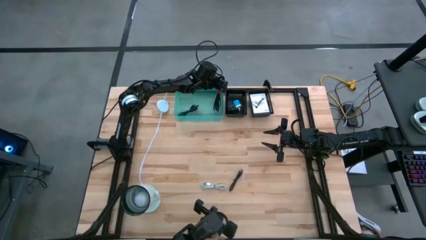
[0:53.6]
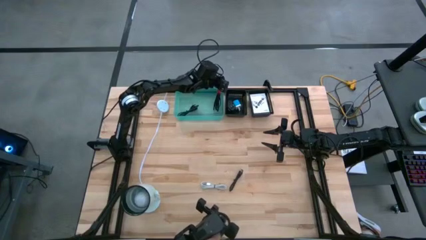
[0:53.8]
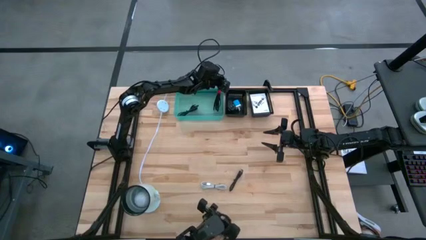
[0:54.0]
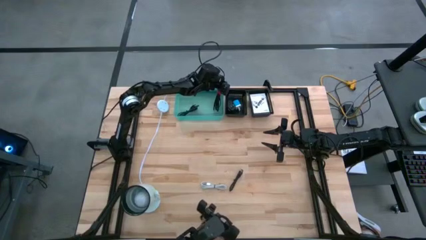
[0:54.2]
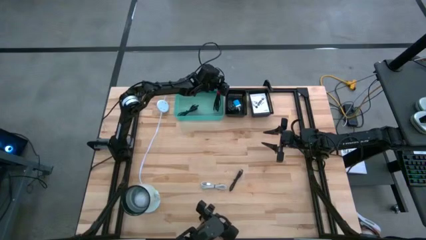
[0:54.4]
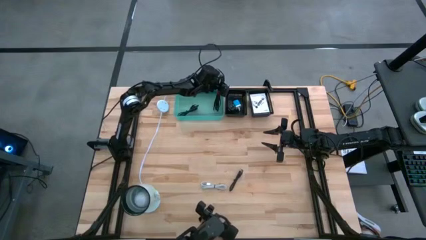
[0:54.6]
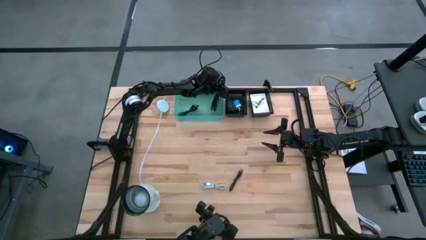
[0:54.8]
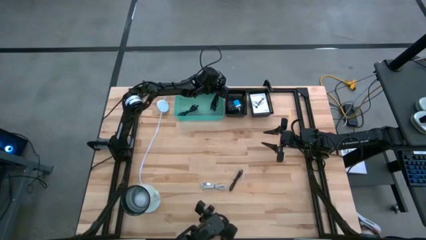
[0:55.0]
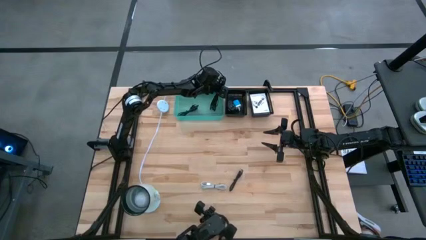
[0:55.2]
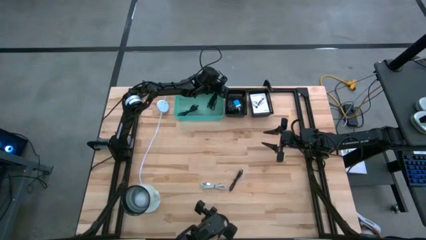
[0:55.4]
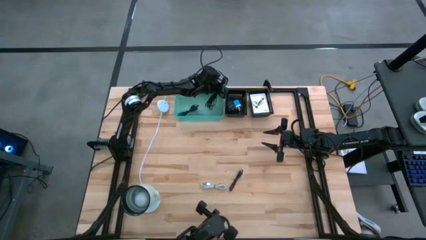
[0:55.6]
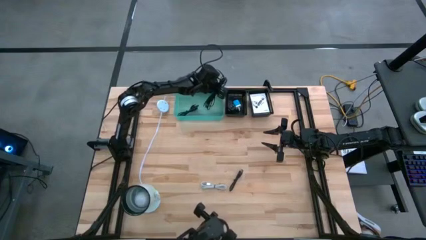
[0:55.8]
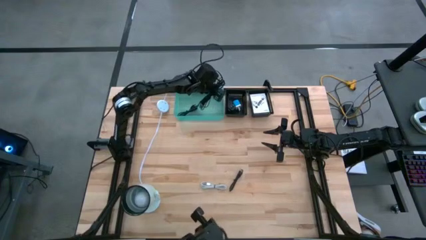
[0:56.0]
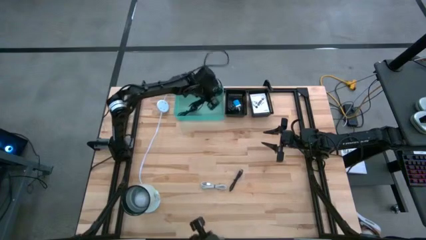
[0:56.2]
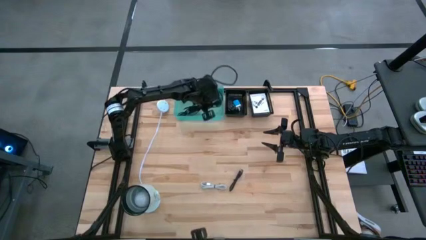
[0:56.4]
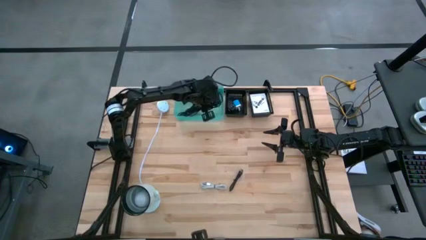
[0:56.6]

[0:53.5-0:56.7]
Task: Pick and place items into bin
Put the left black charger cable into the blue bin

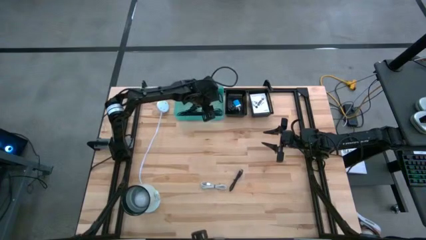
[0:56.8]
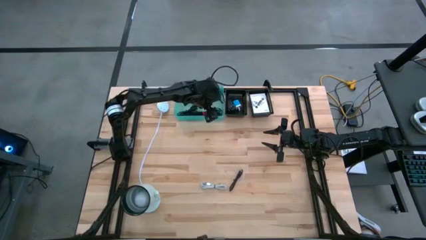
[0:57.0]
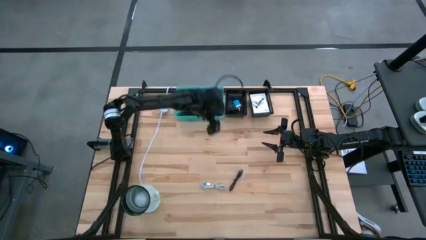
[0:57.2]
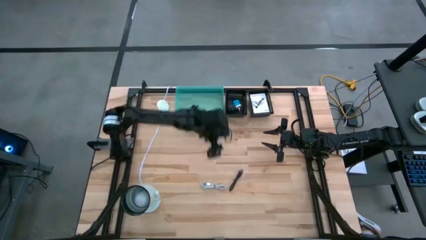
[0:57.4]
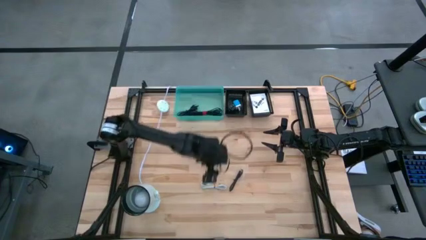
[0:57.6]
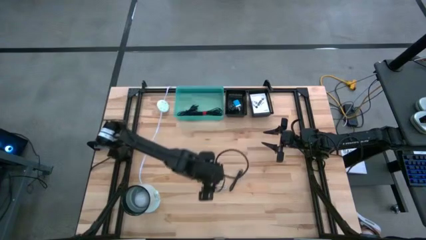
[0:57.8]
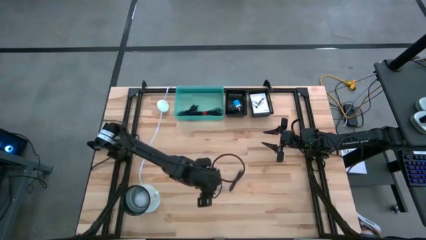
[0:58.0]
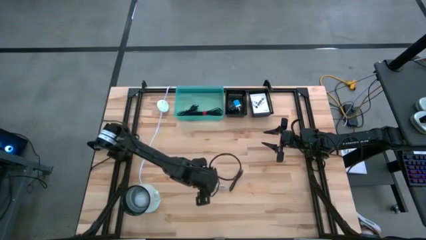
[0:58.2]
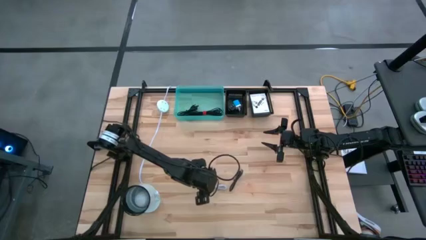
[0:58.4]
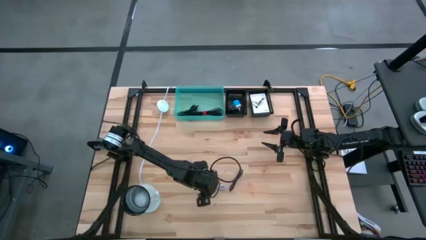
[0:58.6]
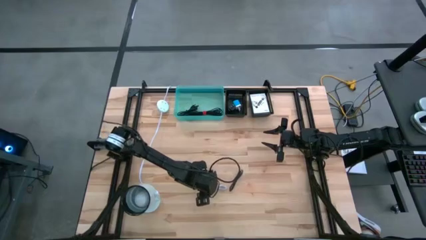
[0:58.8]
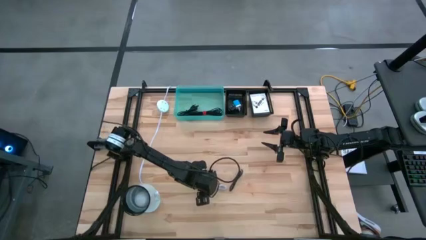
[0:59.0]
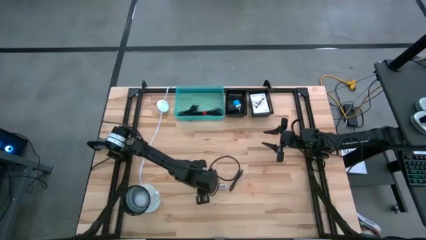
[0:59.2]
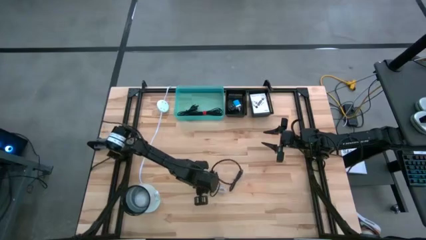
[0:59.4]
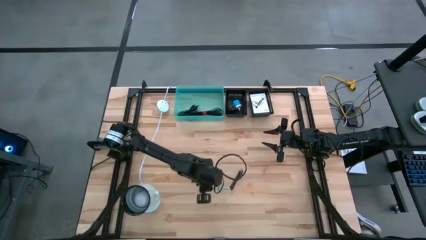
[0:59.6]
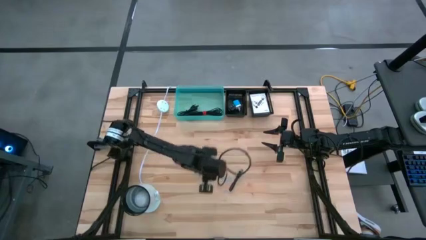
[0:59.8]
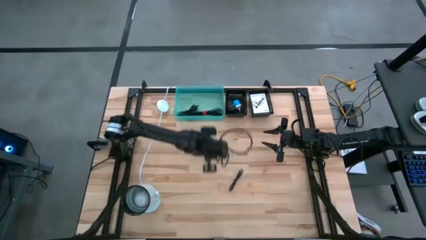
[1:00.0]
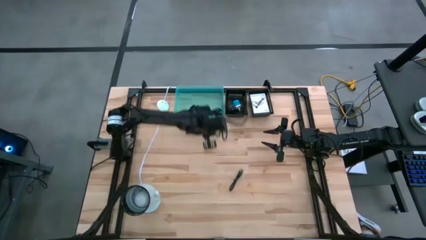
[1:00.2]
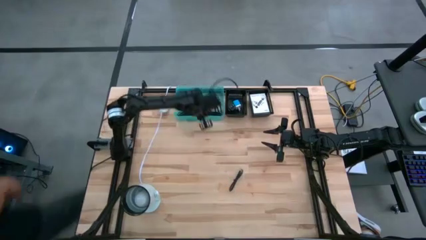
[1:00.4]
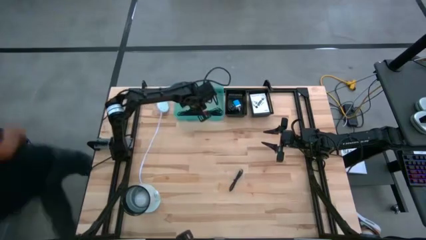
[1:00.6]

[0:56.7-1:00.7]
Put the white charger cable into the blue bin

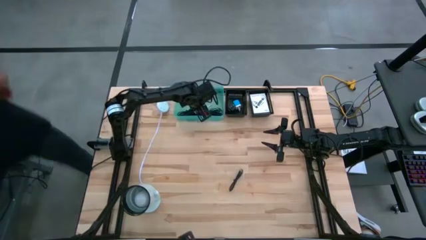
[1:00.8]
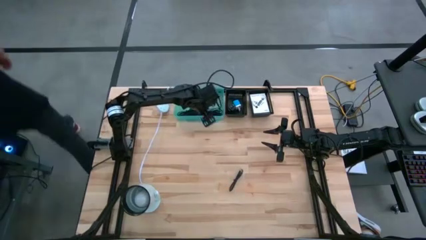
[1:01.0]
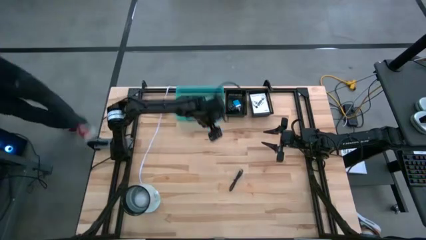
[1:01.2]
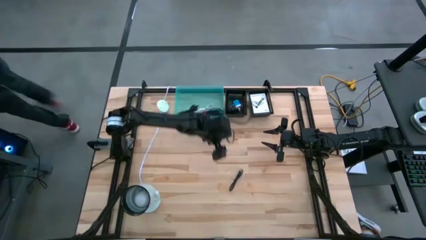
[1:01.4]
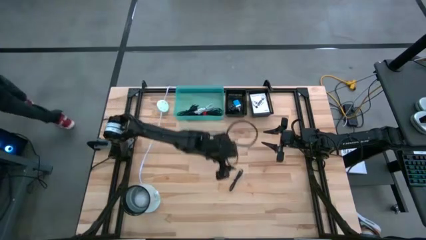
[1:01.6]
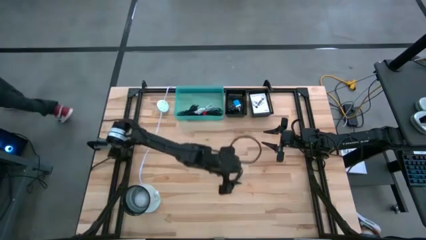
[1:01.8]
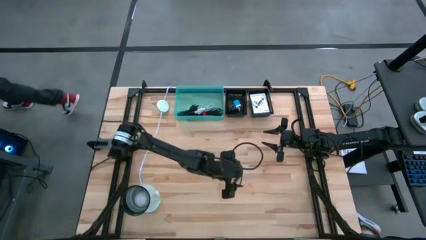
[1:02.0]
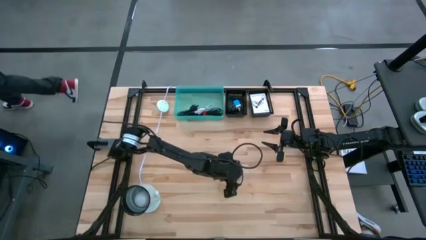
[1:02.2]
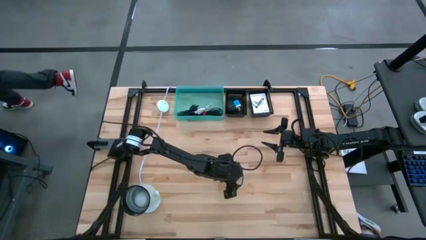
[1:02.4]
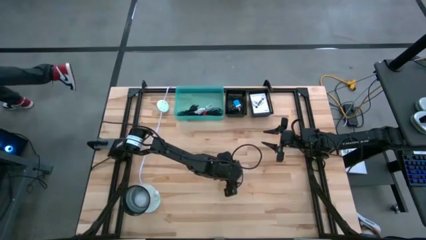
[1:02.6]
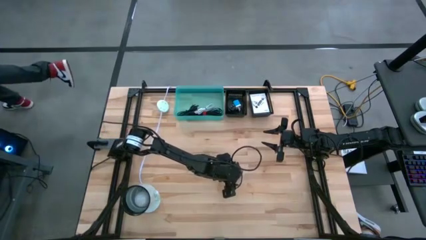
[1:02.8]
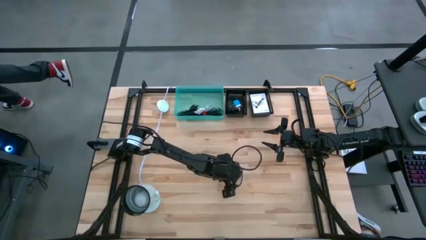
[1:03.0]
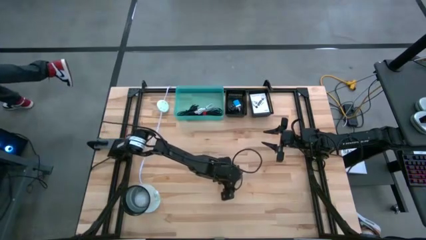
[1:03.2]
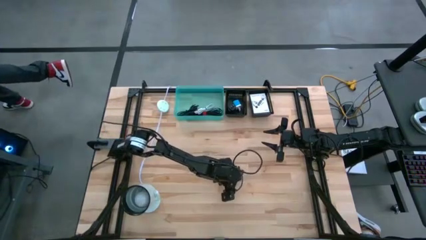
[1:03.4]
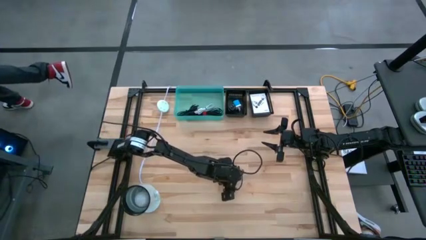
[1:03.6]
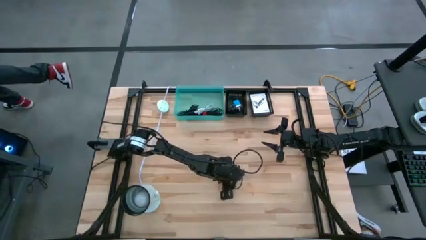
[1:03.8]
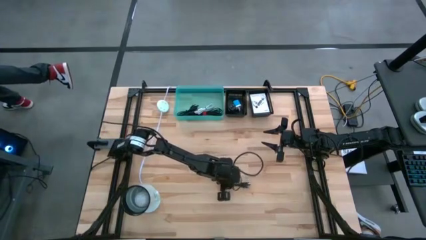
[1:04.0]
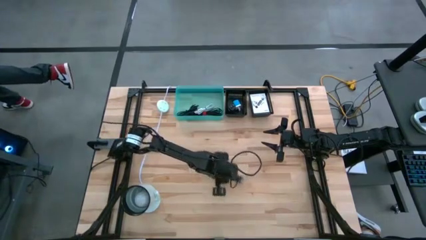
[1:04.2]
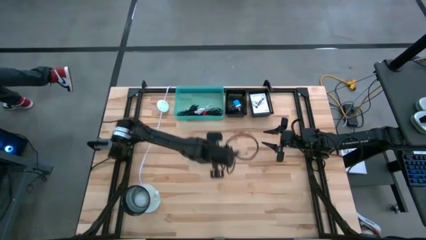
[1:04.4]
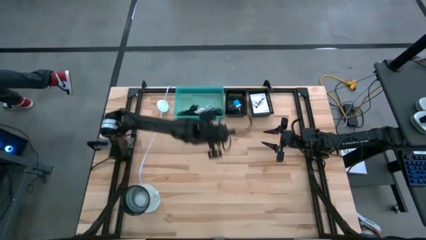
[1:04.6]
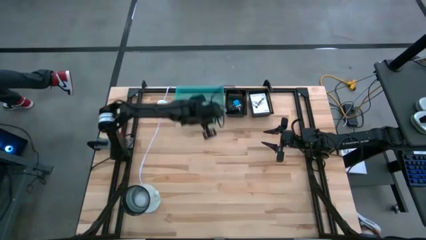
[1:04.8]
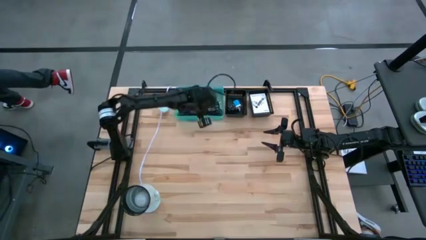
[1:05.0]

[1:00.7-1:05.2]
Put the black charger cable into the blue bin

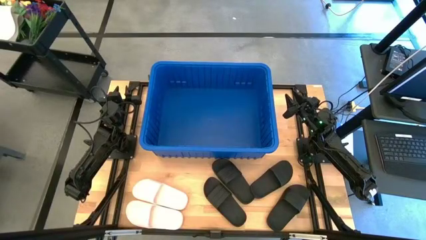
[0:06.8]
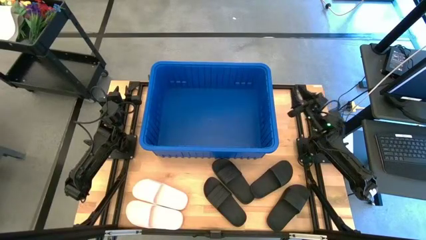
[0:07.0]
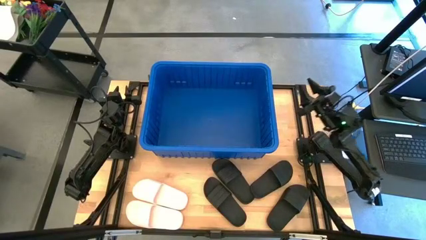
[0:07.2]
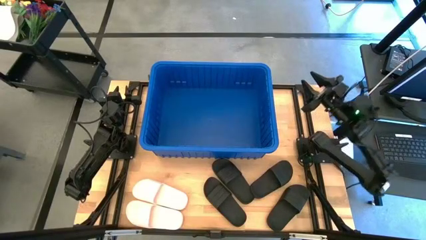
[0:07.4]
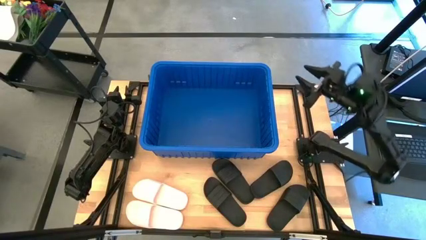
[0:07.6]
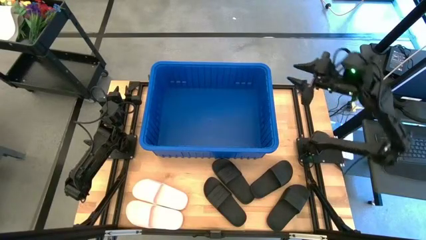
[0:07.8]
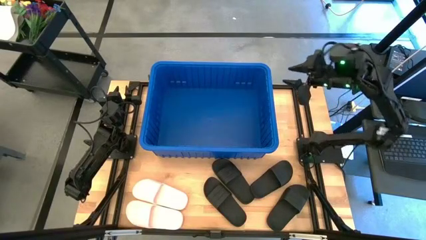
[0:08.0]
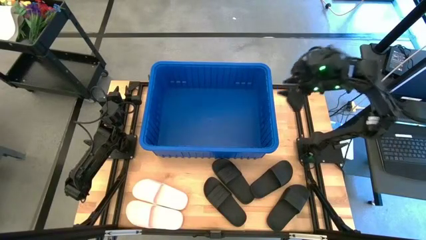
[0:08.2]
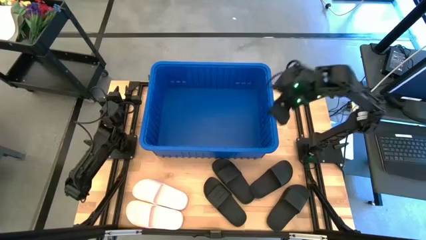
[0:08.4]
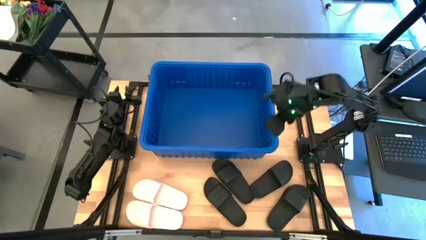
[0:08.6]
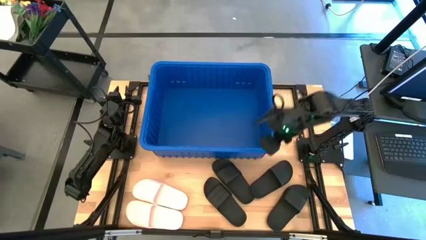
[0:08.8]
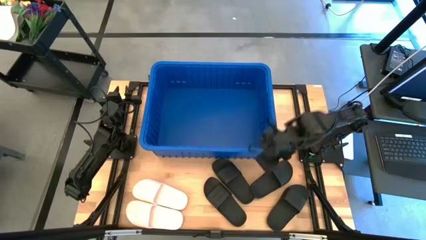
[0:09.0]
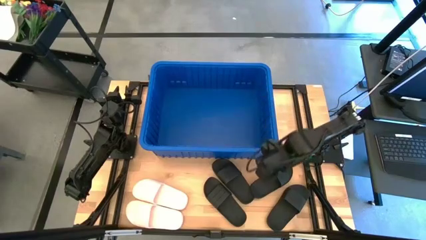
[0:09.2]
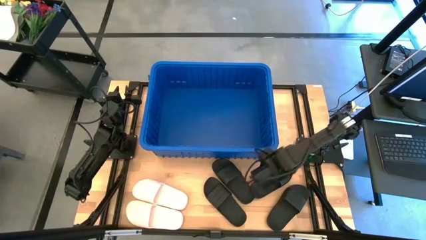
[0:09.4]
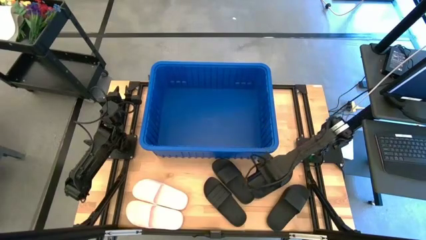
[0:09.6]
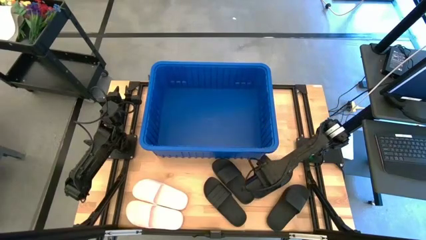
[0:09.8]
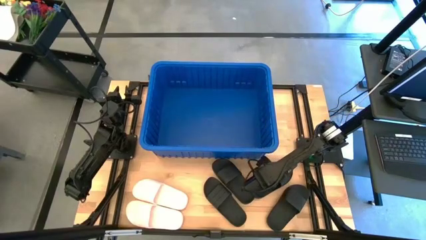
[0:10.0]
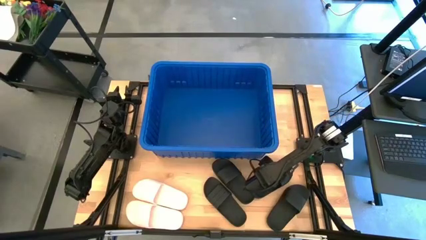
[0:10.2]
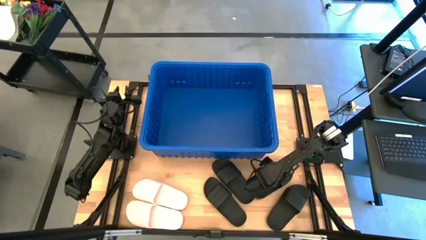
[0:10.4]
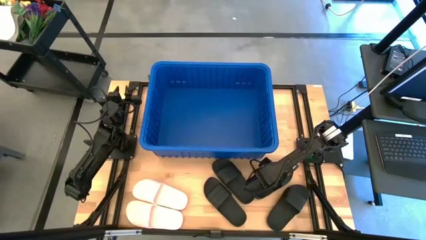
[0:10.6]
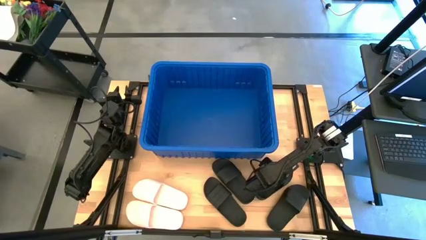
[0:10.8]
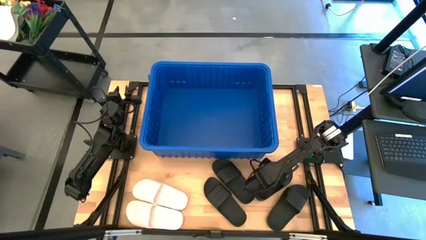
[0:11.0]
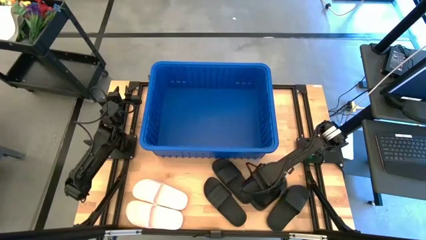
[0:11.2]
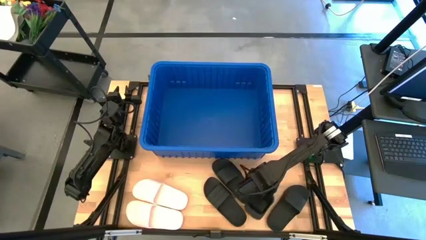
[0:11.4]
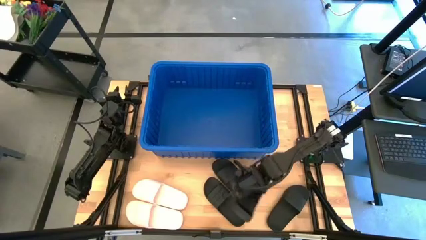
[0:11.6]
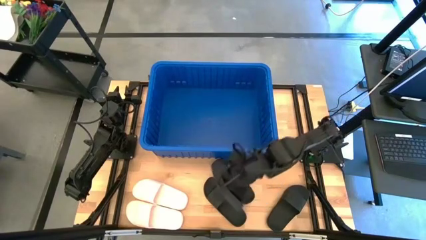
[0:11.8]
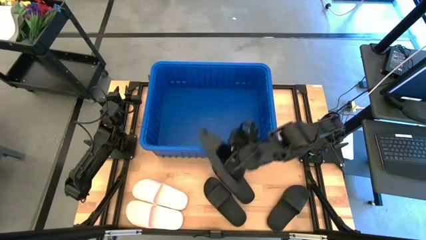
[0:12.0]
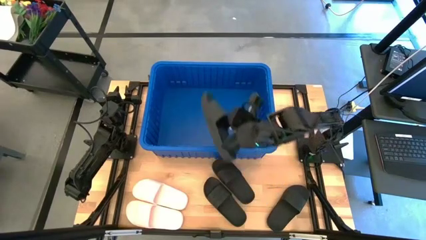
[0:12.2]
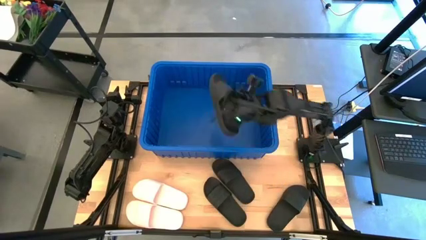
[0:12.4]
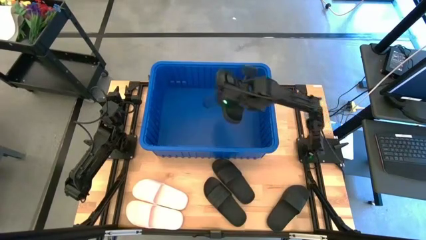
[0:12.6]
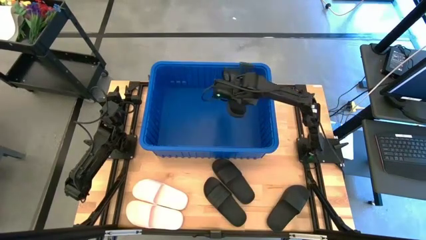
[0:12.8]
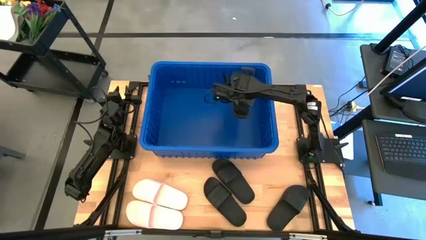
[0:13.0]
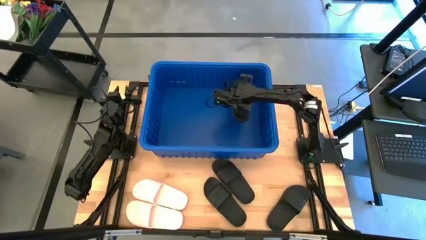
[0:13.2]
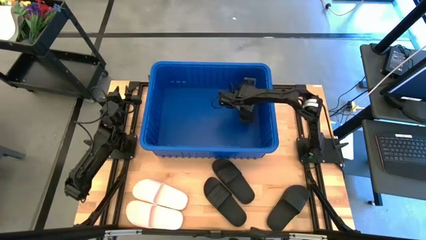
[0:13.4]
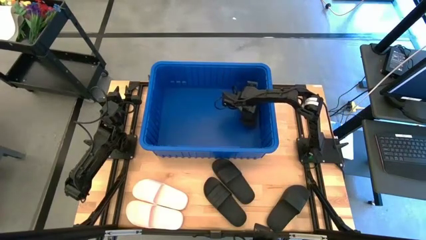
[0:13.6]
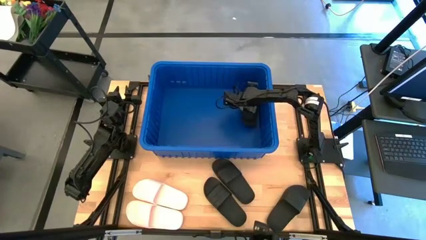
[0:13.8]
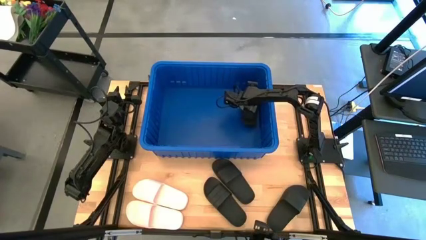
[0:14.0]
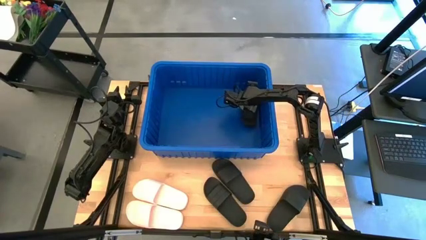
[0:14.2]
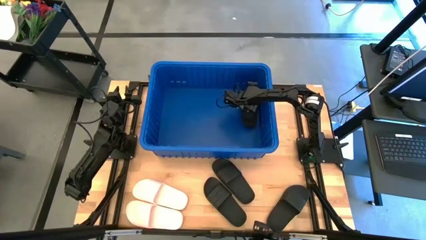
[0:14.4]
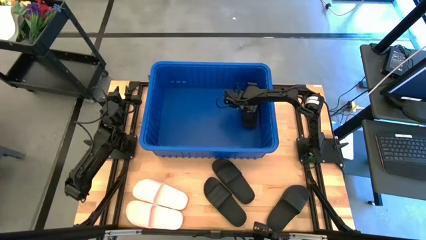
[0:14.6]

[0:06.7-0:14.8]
Task: Pick and place slides into bin
Put the black slide into the blue container
